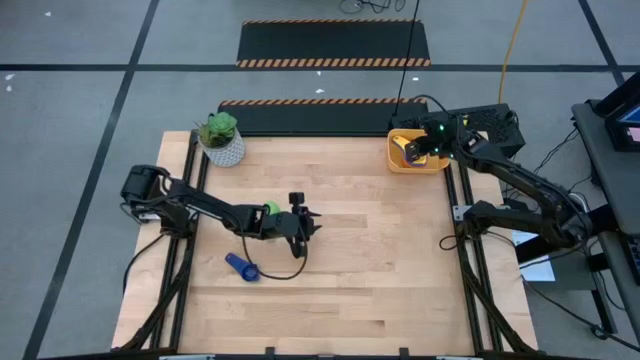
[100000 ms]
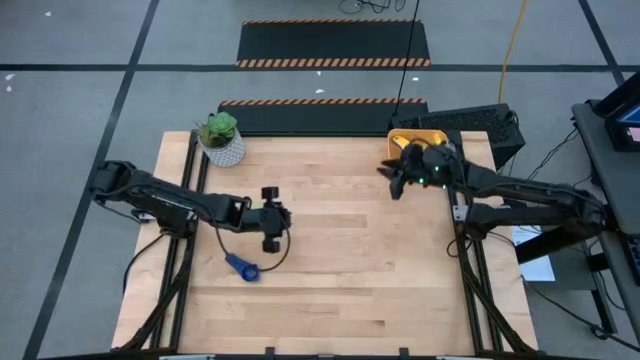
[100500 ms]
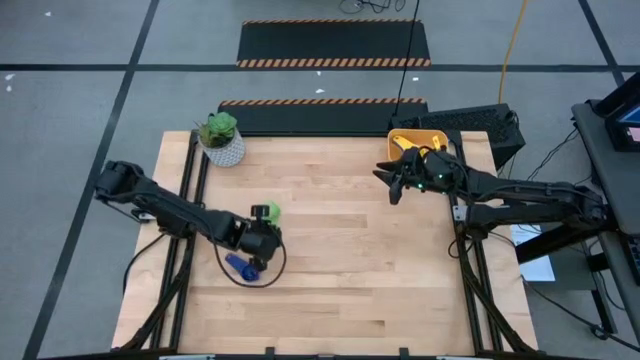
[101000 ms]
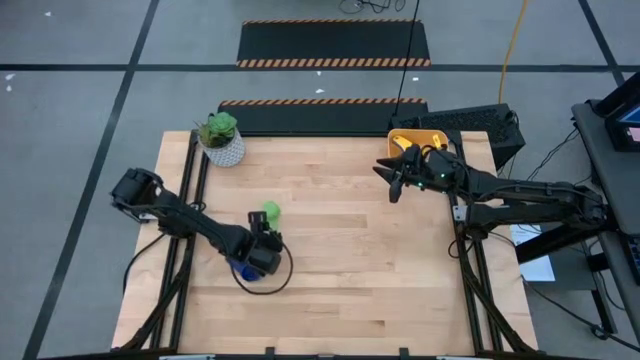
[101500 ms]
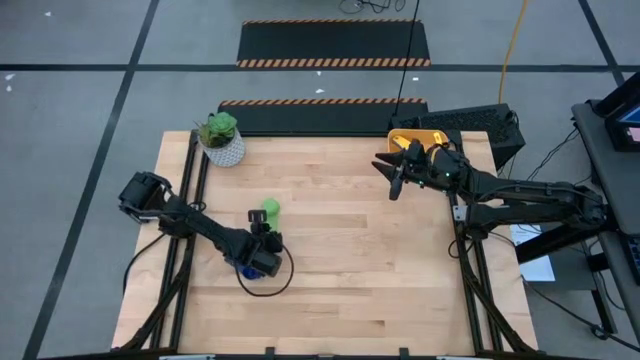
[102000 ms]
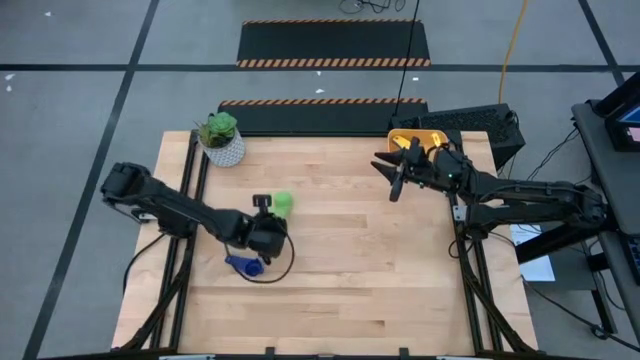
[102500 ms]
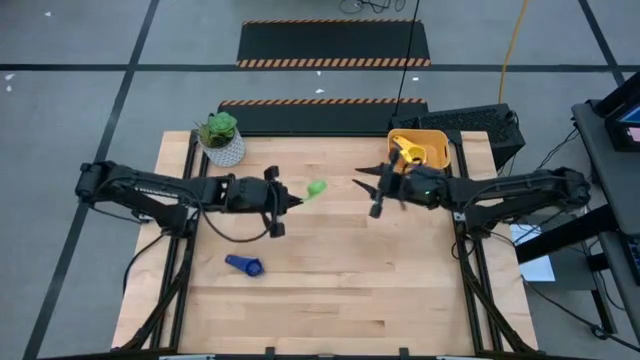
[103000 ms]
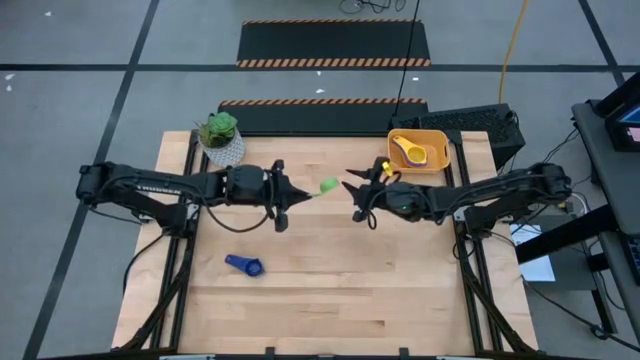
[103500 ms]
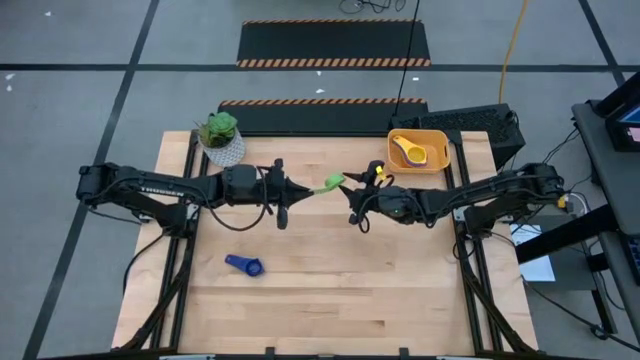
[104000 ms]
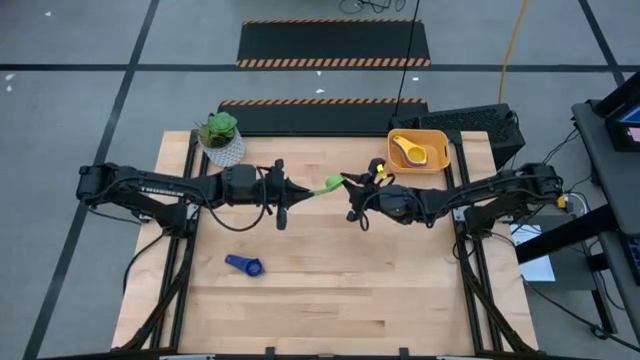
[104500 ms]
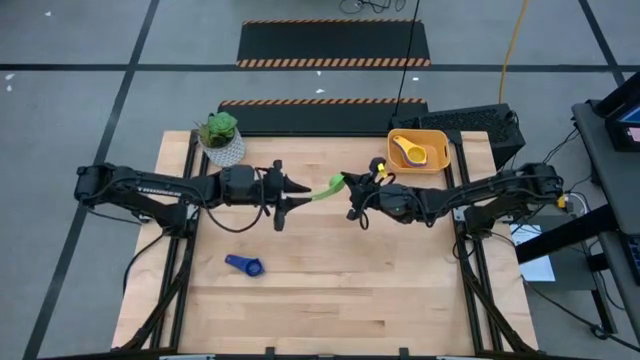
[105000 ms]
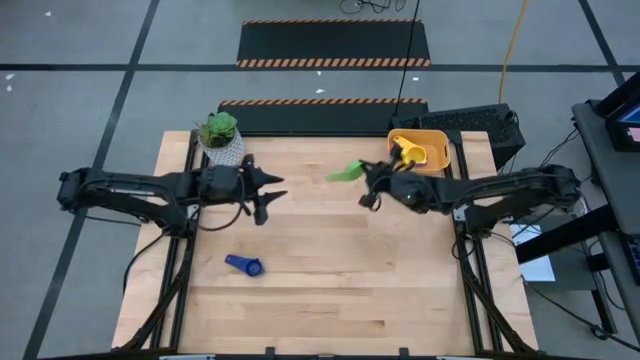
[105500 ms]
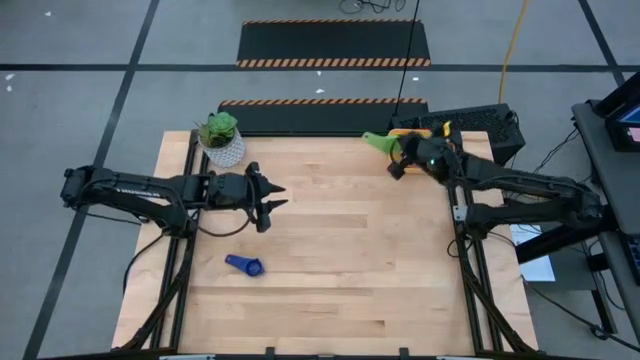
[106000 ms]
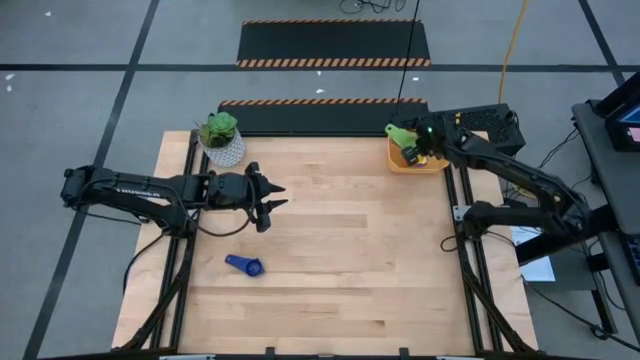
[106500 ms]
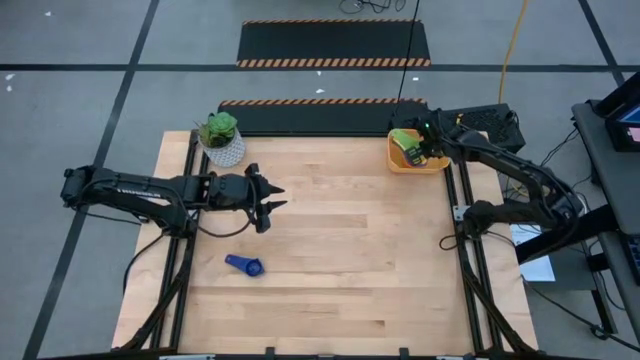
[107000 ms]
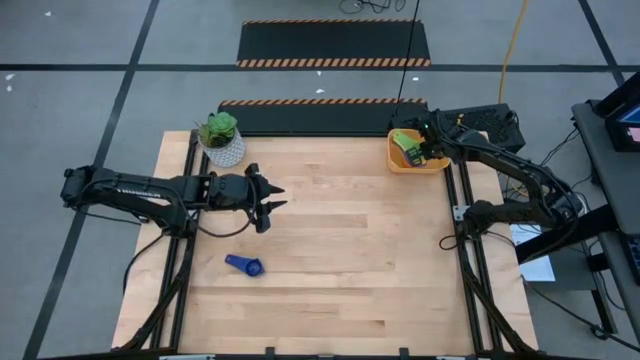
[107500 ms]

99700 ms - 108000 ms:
Task: Nest measuring cups in basket
Stack the green measuring cup on top of the yellow measuring cup into the bin

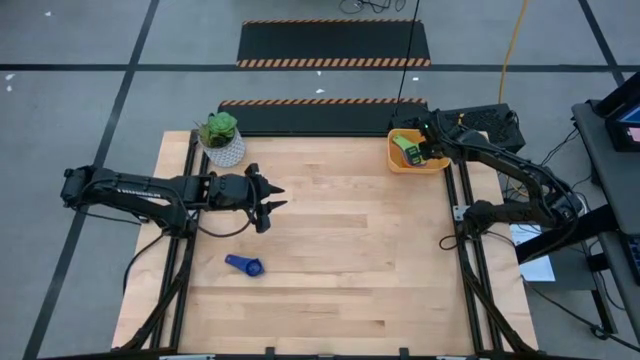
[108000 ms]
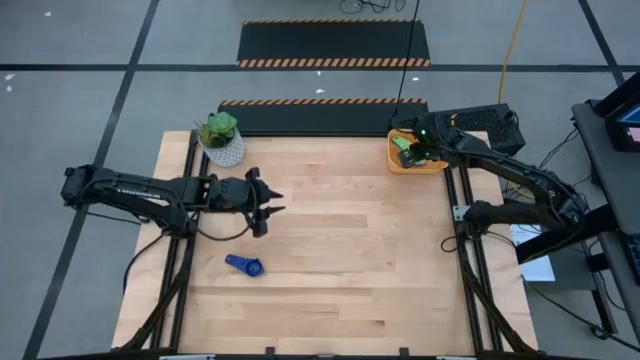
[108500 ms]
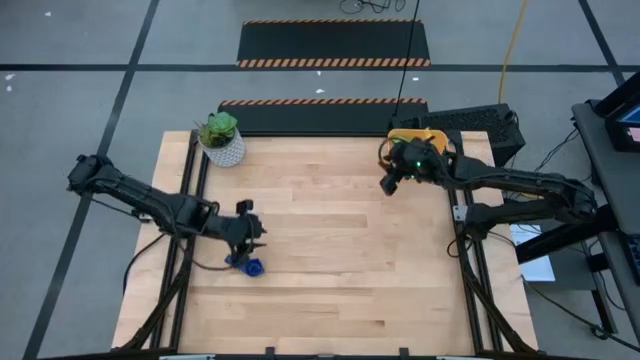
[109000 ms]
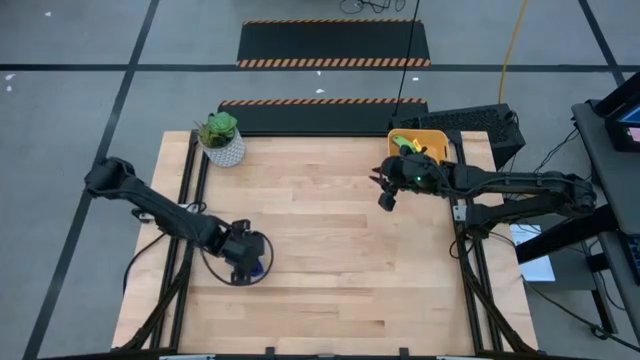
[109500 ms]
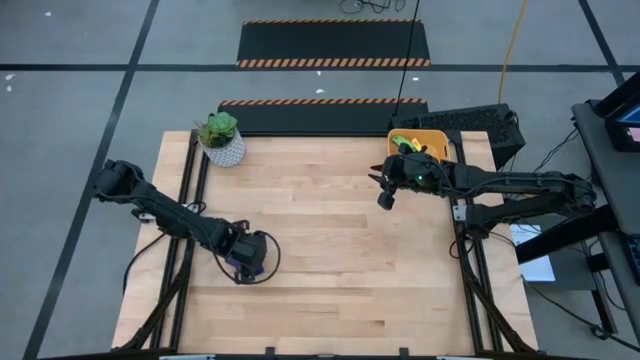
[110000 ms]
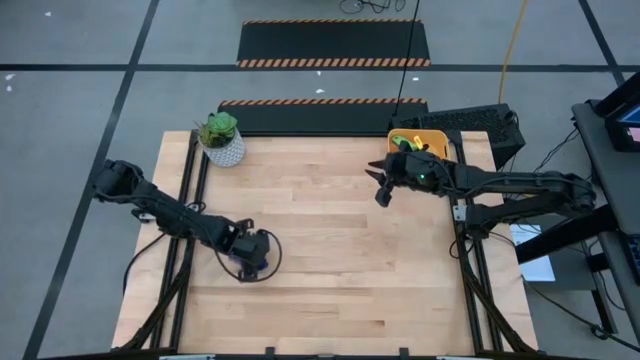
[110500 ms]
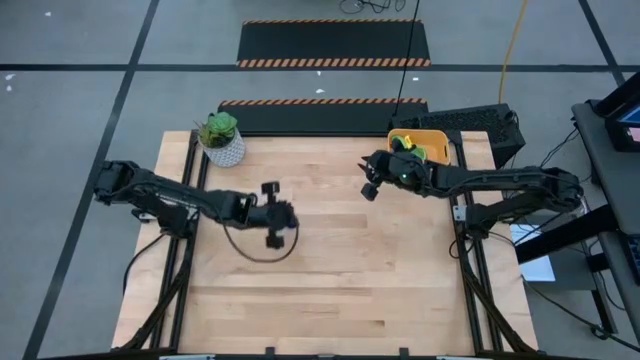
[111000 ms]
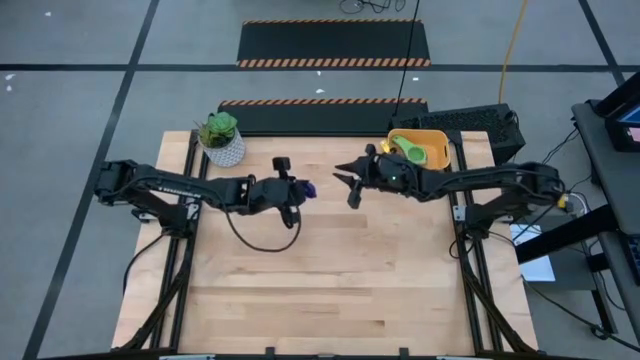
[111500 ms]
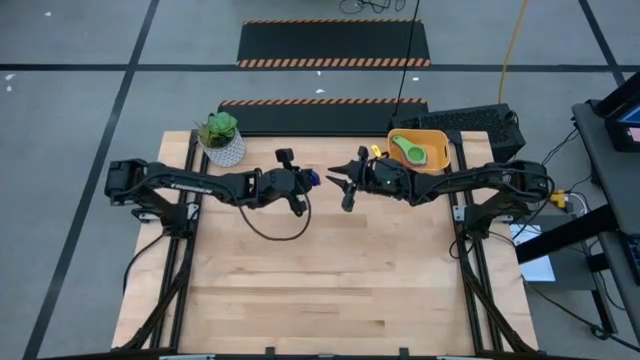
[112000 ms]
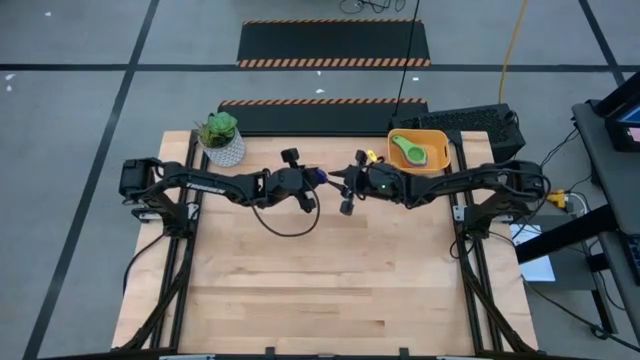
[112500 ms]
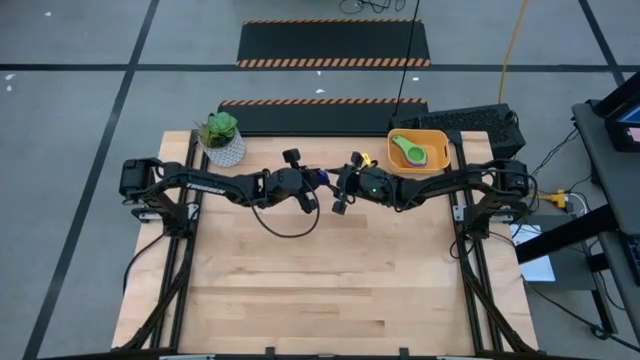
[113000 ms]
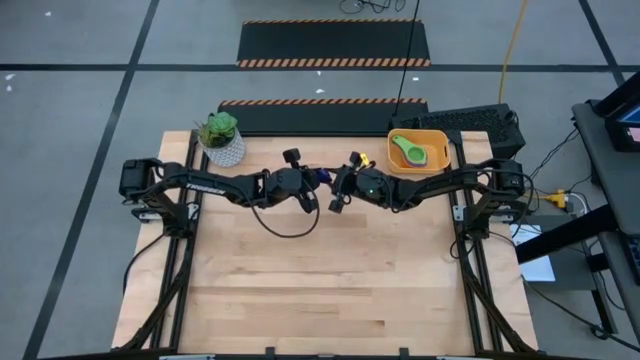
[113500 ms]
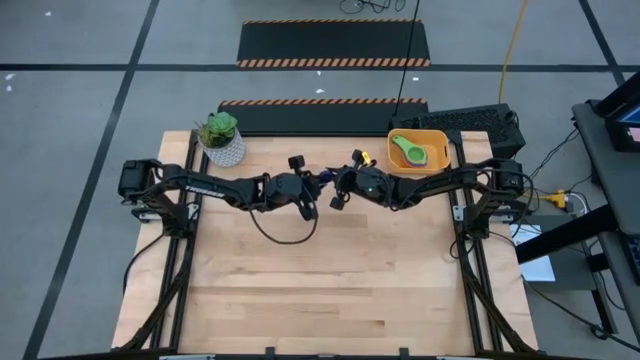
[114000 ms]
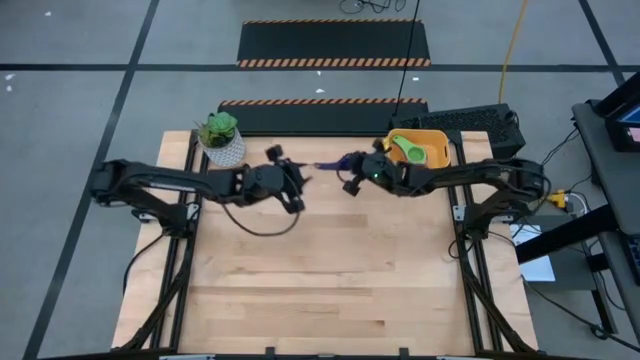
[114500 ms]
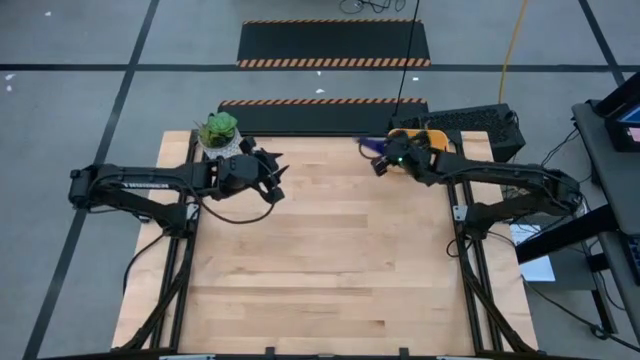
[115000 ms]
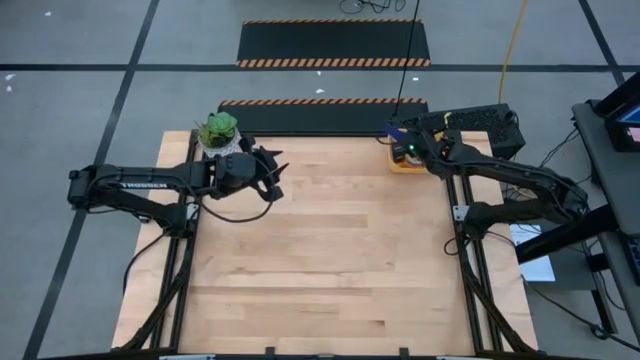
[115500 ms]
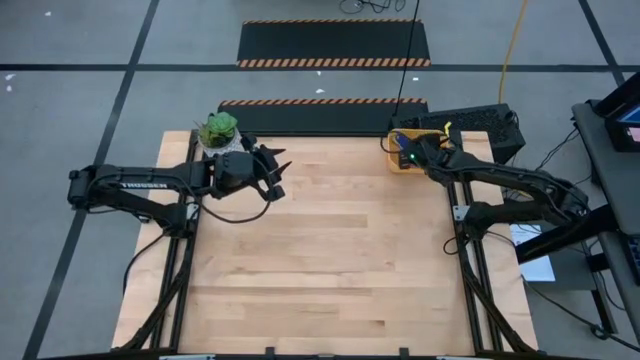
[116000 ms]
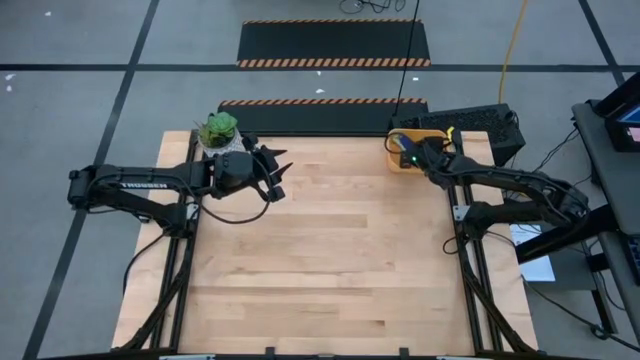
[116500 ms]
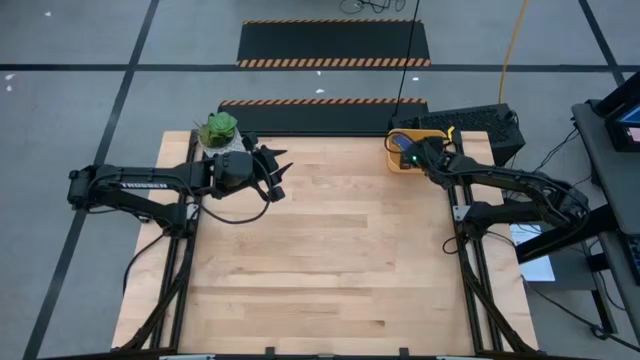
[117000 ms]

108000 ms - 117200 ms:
Stack the dark blue measuring cup on top of the green measuring cup into the bin

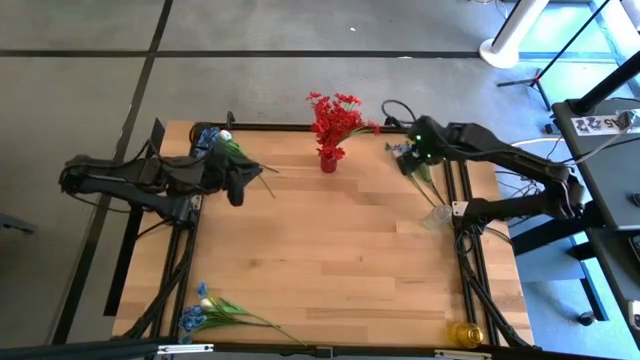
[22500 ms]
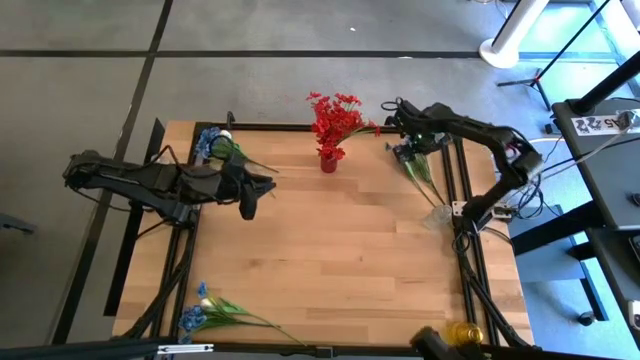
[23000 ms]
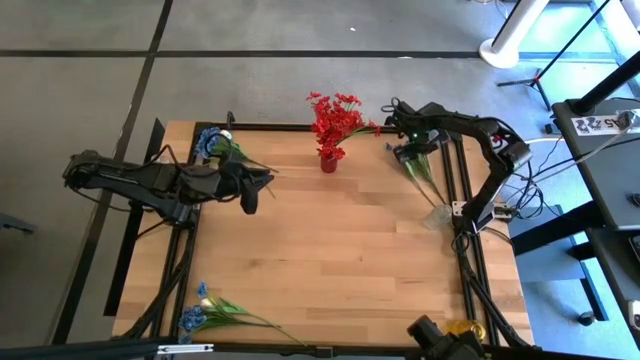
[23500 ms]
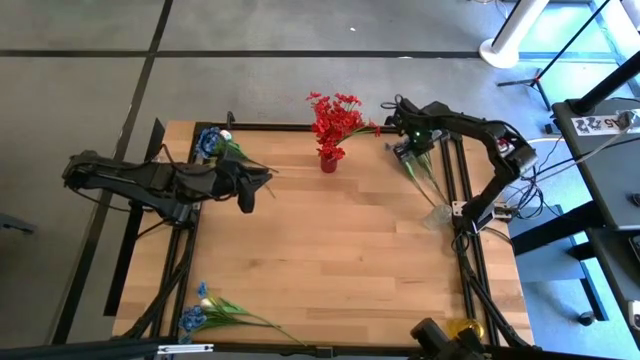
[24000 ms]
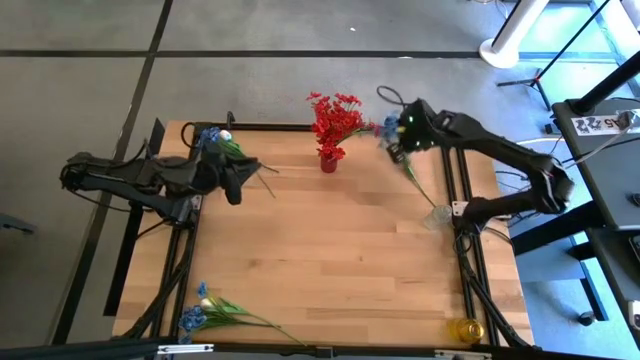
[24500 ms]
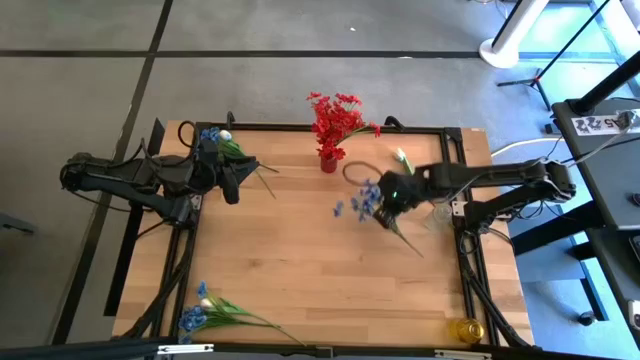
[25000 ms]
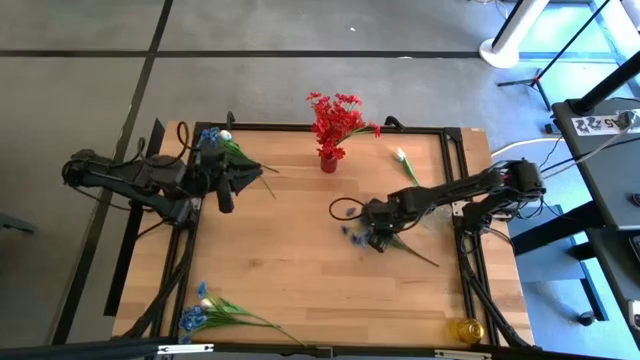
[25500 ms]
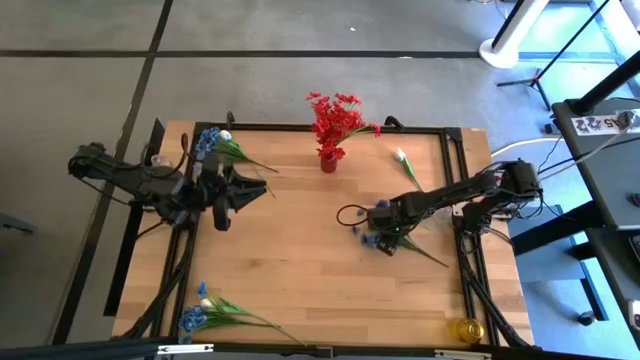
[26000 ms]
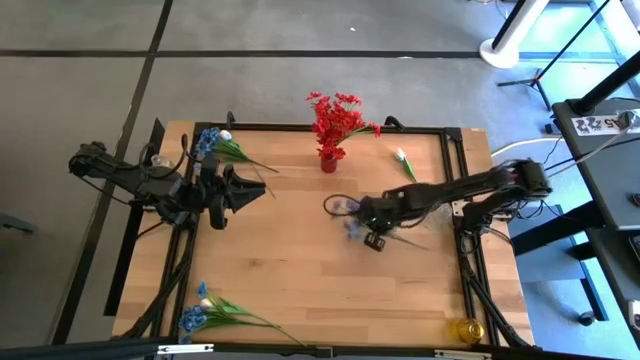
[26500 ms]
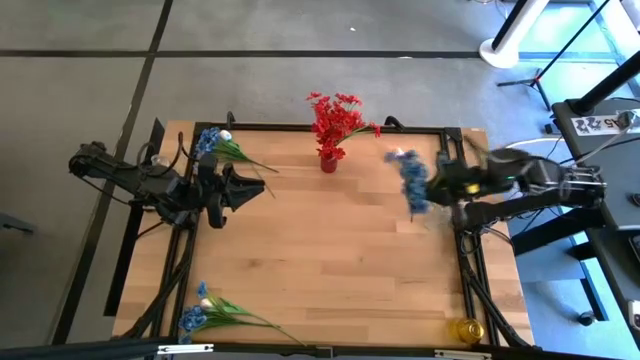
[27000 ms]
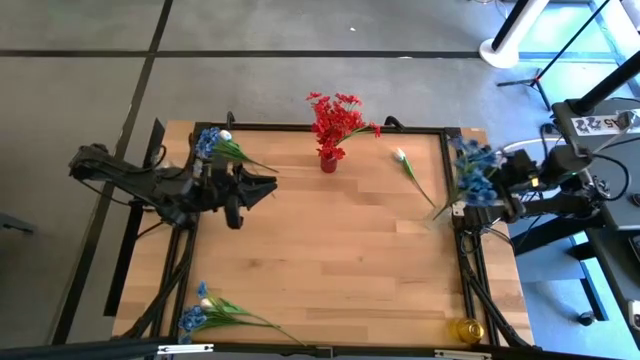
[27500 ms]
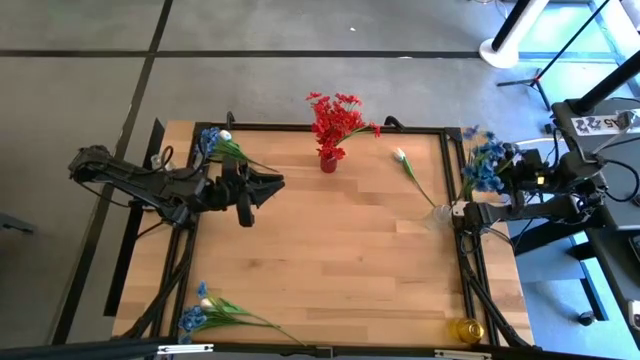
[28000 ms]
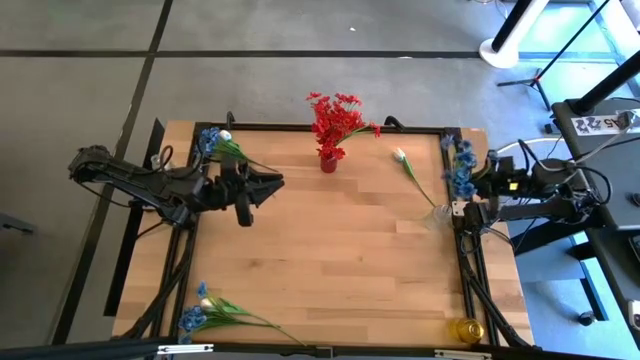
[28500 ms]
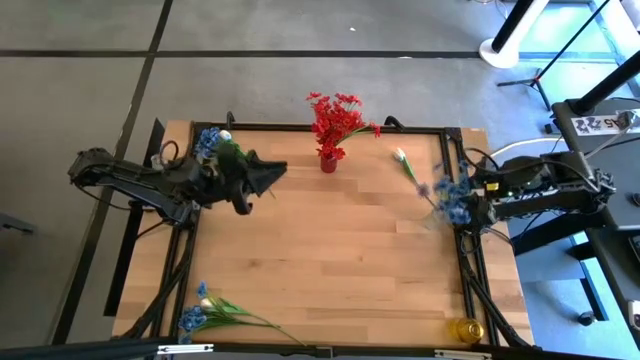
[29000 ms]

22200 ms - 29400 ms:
Task: Sort flowers into vase by color
Put the top right blue flowers into the transparent vase
